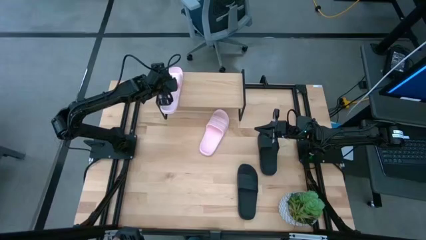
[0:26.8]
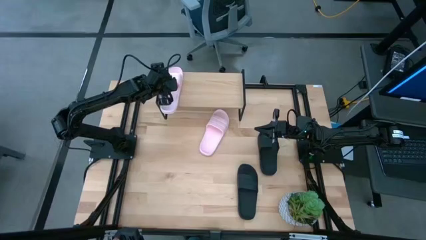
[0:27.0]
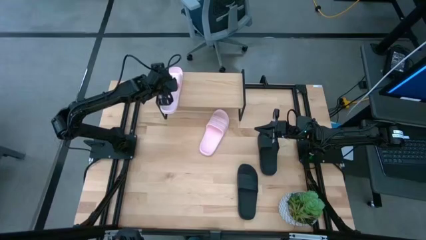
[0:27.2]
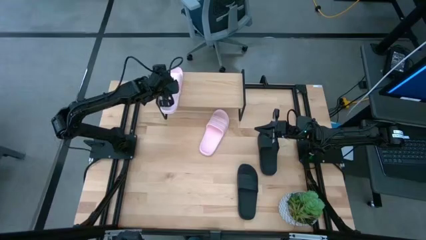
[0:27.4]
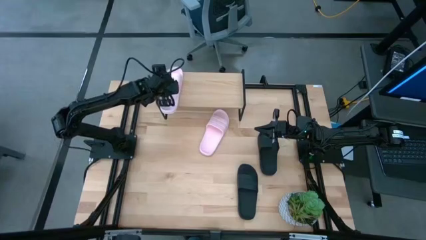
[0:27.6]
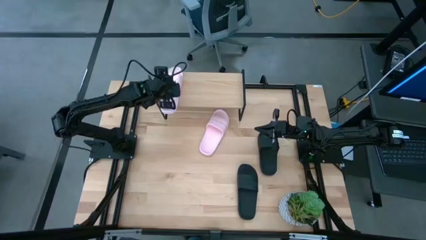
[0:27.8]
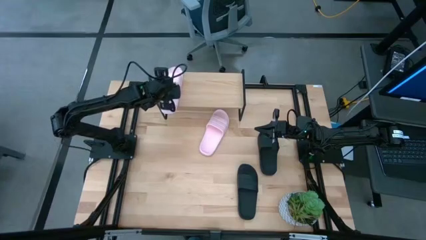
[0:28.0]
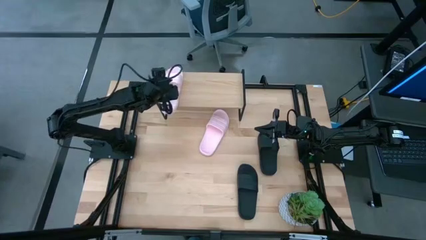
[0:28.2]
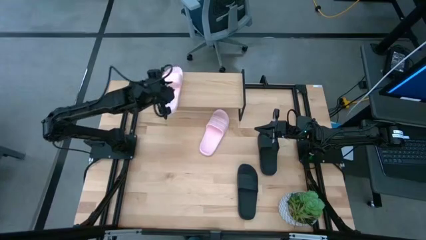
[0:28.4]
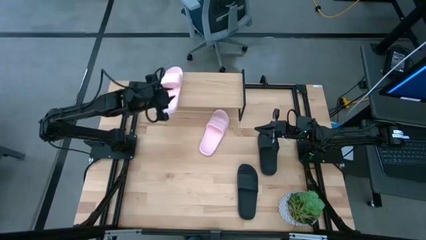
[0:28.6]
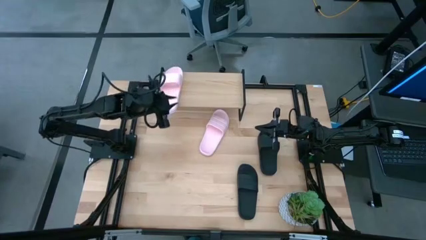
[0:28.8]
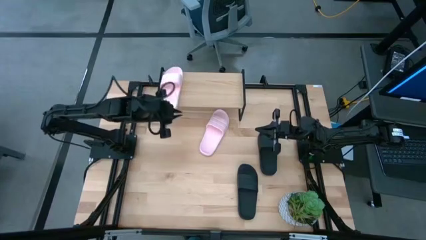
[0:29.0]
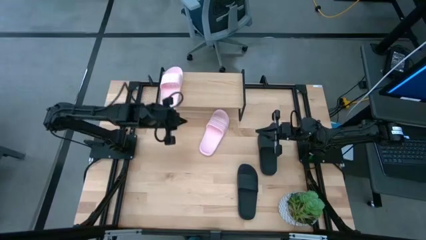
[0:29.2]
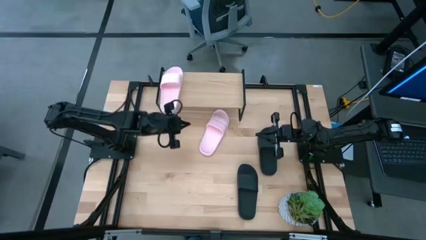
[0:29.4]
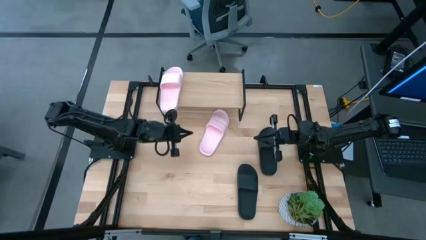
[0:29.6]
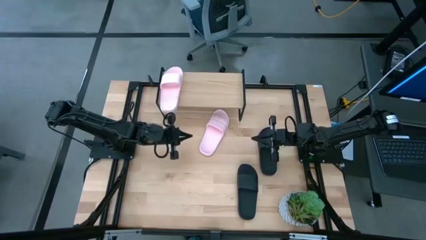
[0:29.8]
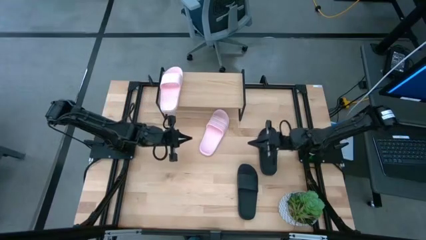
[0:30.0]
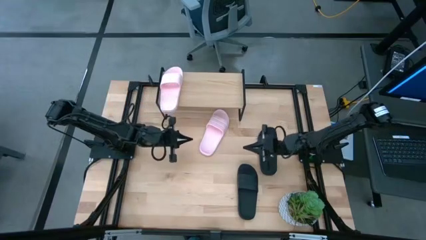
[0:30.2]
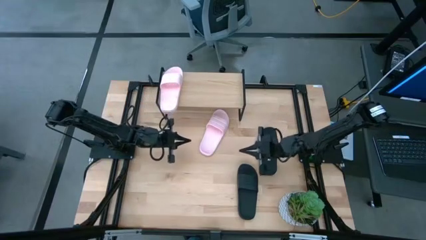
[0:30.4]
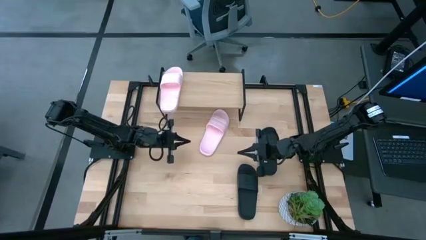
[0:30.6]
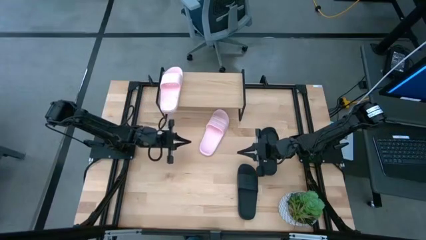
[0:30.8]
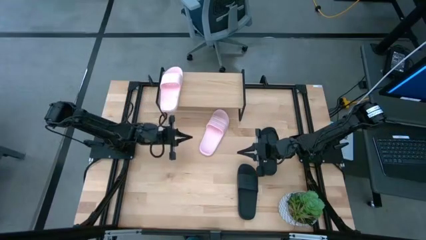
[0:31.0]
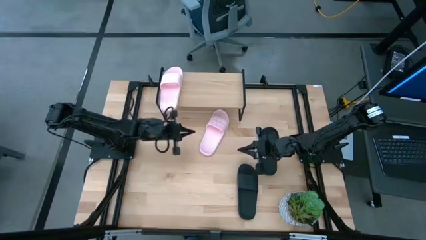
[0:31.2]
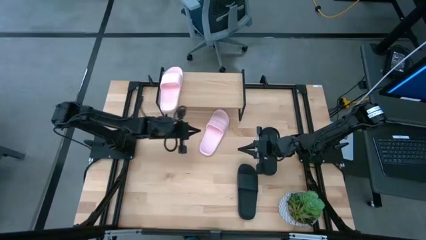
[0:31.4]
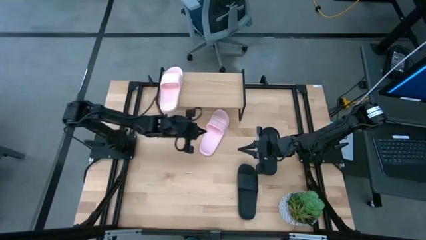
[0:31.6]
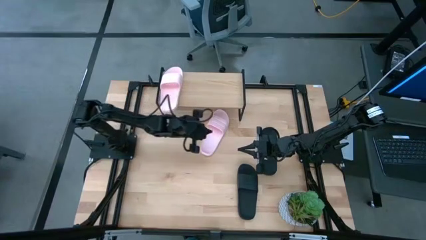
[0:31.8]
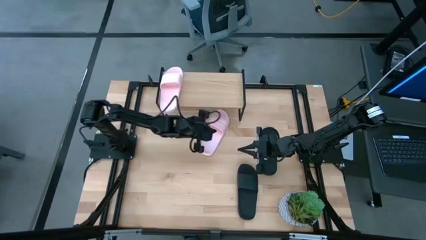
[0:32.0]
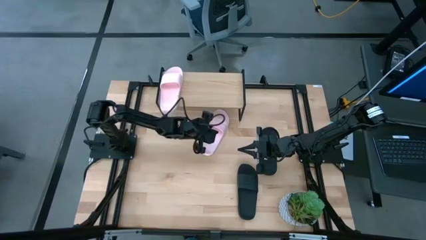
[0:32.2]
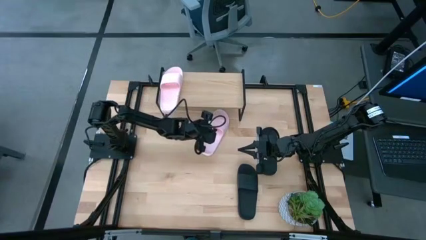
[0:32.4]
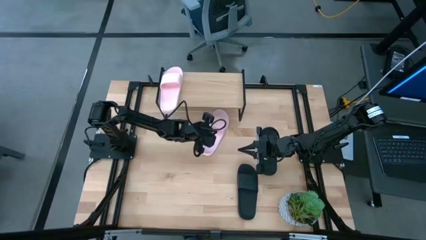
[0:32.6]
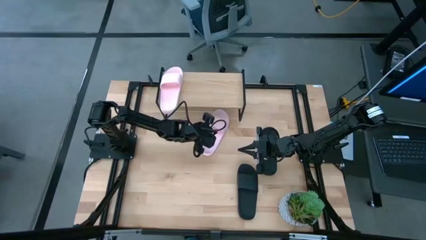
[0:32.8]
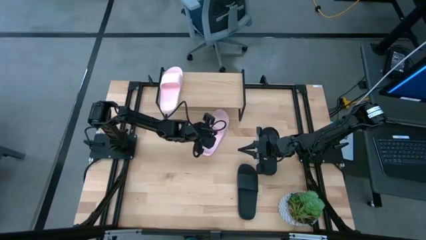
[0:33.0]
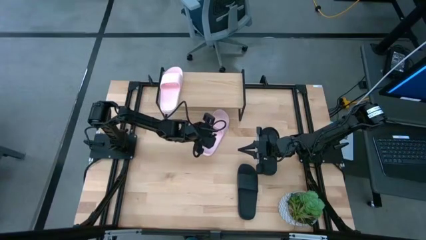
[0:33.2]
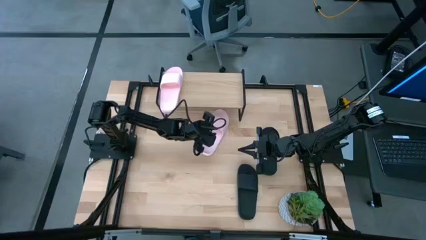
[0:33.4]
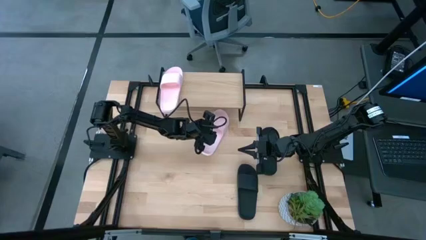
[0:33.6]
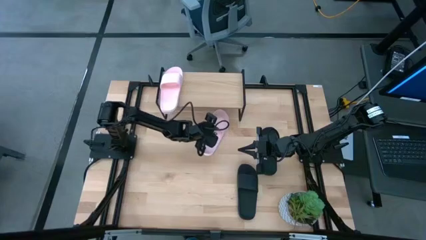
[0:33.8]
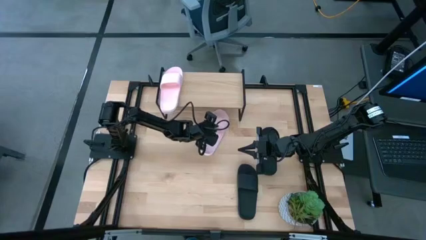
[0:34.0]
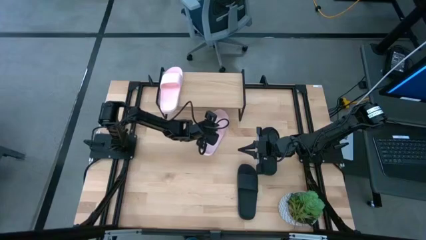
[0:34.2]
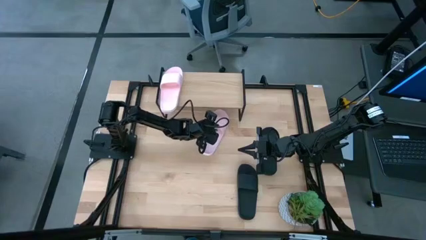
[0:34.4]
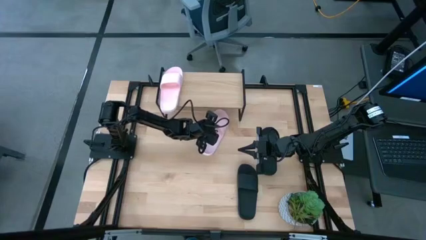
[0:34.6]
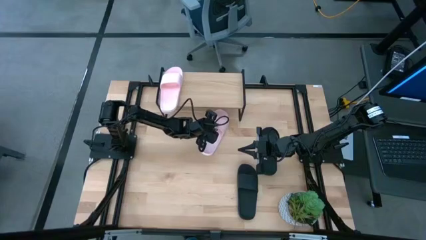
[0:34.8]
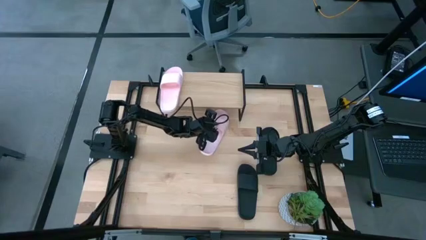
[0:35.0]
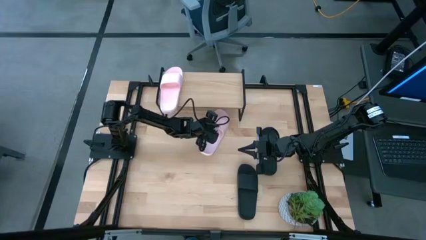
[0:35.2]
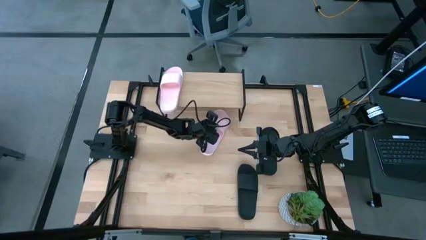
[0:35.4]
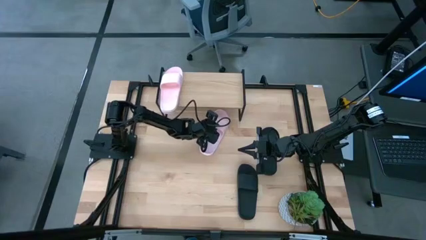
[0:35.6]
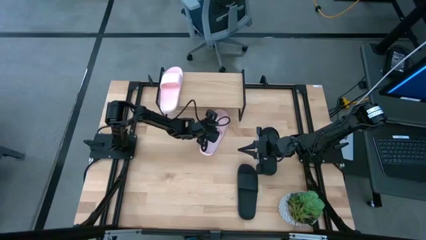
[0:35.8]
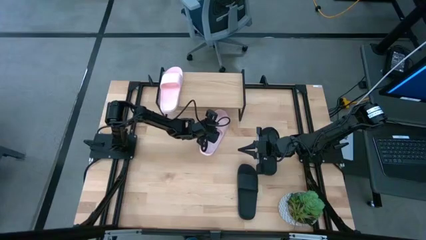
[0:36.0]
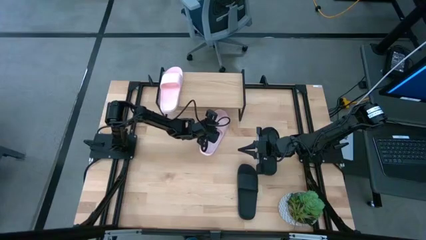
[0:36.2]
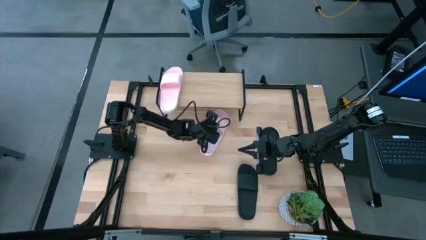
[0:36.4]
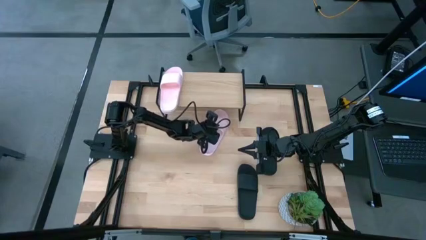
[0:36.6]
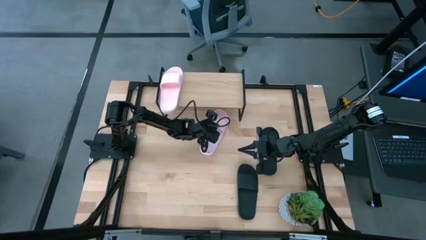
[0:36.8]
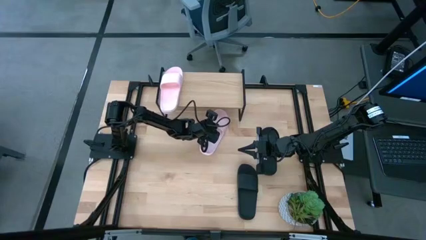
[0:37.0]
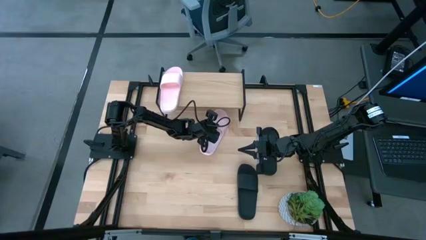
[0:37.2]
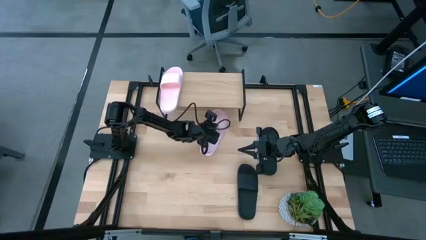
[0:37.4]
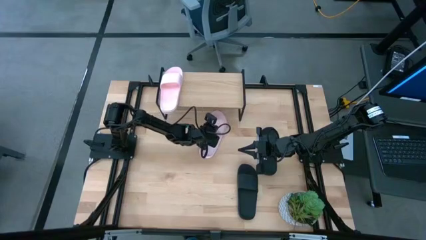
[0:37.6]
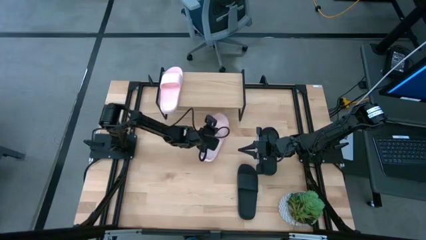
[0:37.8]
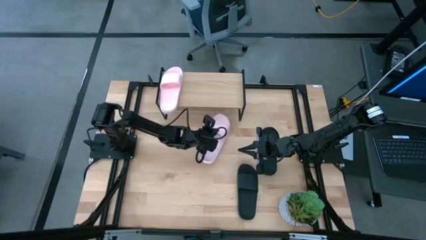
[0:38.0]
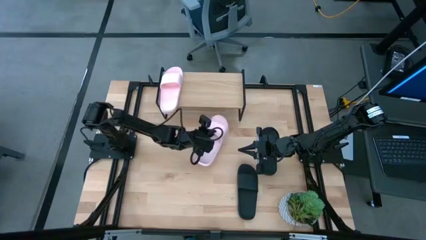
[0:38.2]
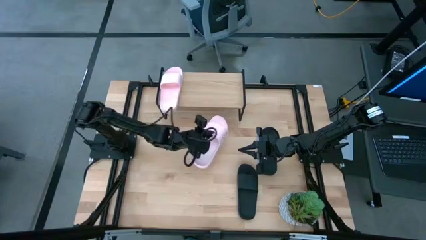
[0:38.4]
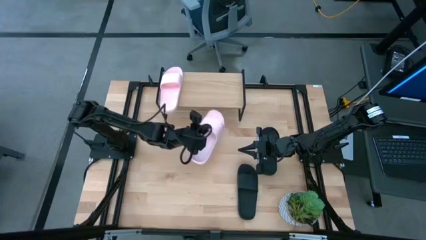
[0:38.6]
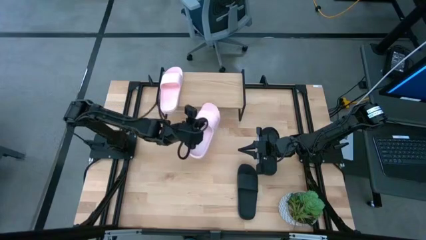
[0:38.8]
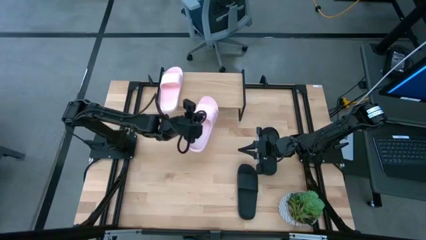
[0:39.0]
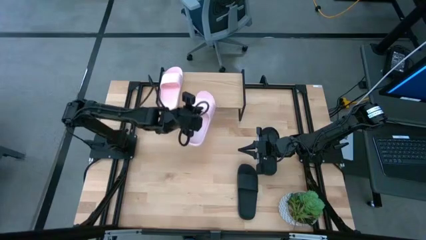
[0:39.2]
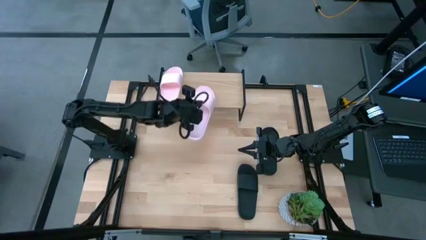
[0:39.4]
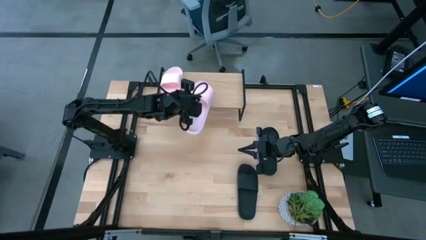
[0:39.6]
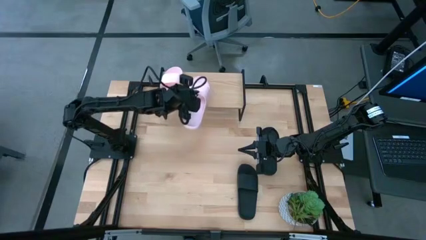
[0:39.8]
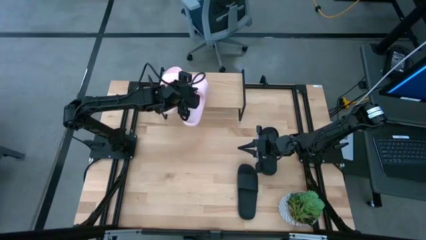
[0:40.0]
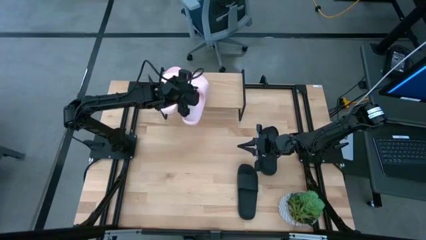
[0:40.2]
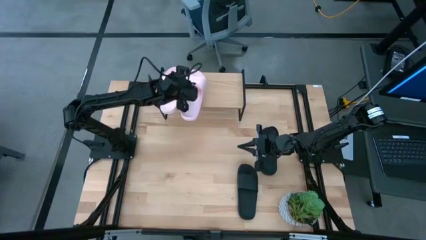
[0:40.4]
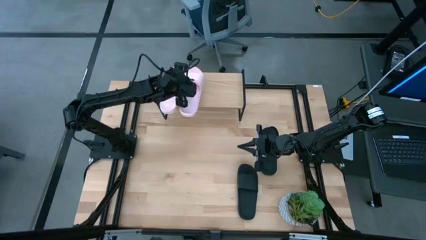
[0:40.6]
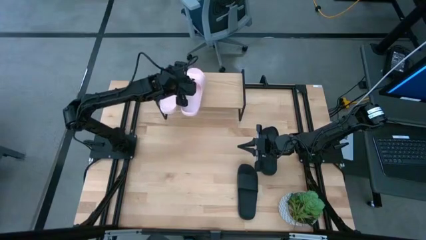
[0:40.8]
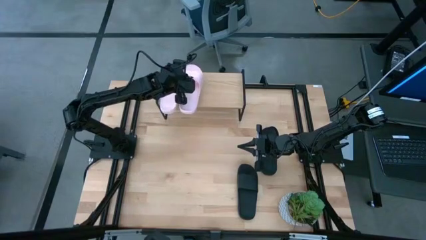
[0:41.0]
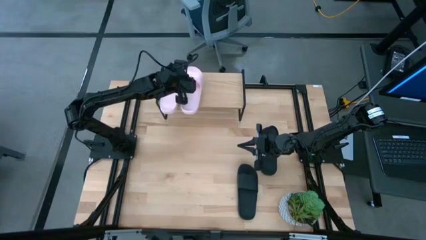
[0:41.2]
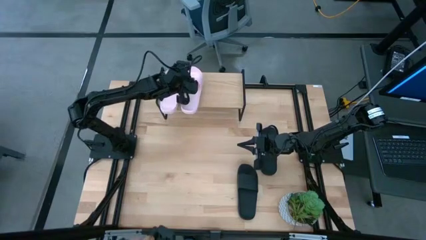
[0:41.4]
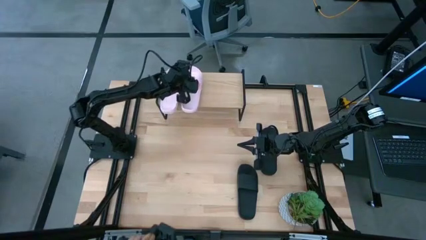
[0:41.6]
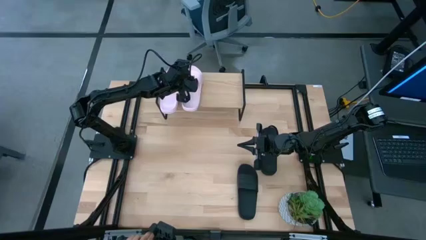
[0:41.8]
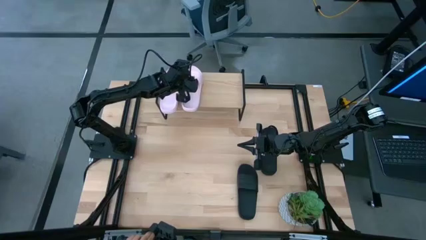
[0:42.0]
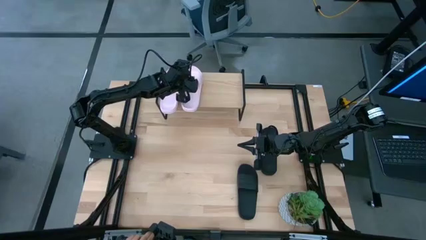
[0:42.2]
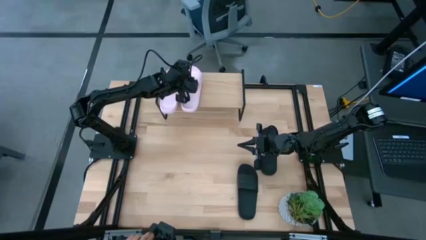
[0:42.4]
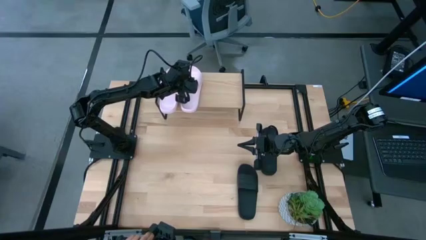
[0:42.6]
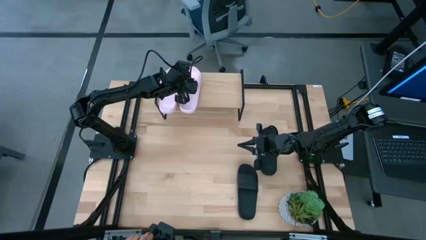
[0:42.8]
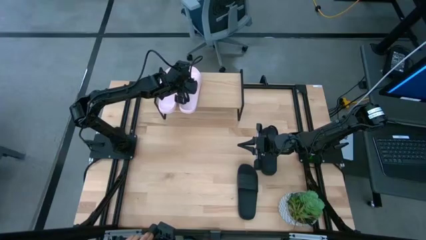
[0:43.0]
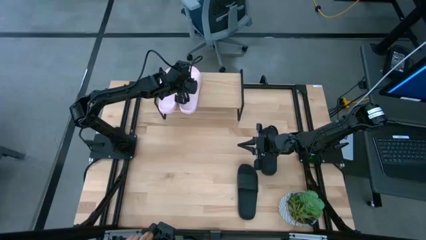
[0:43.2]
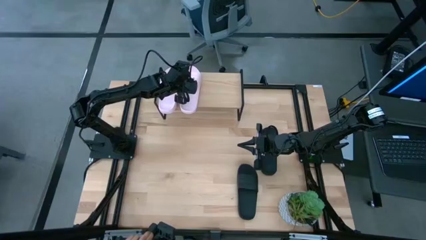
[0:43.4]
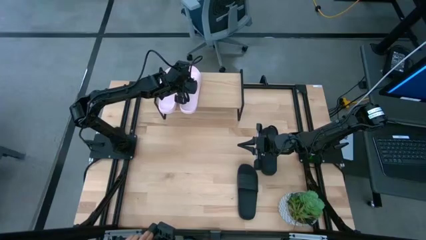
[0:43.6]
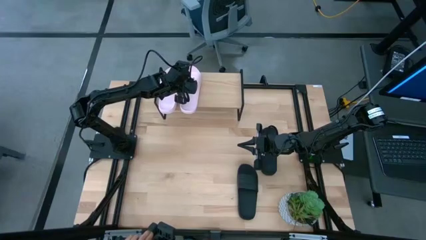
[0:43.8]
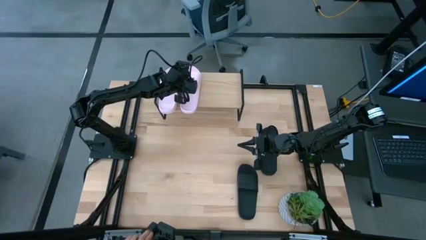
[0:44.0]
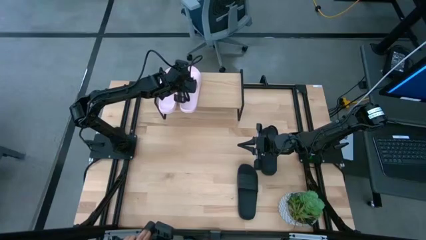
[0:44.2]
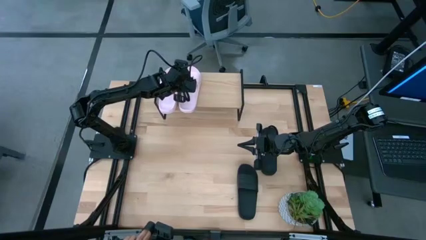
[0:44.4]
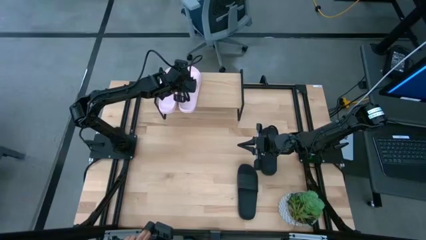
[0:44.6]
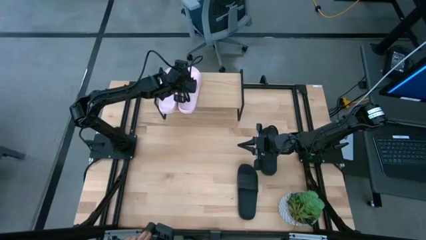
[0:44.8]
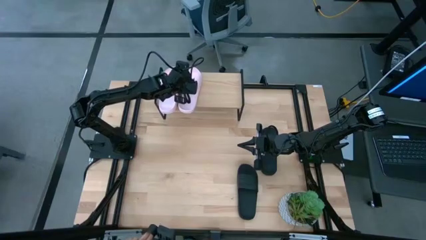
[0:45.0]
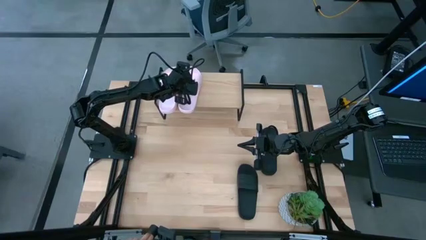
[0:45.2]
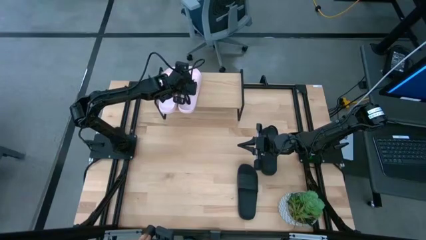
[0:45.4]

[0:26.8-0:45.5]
Task: Pick and place slides into the shelf
Put the pink slipper on the shelf
